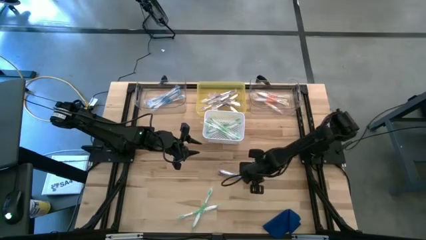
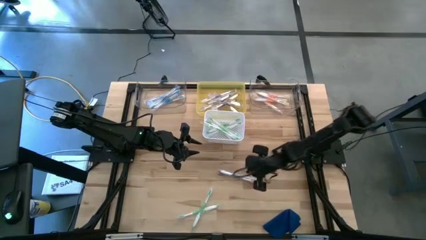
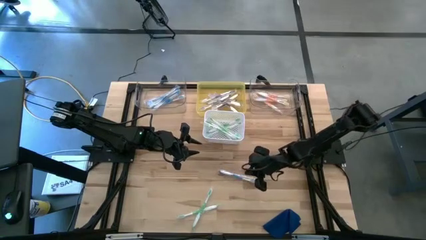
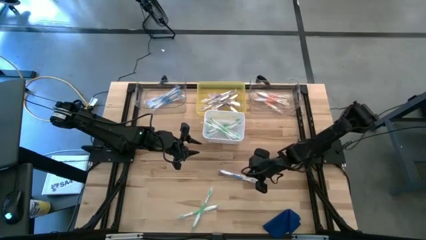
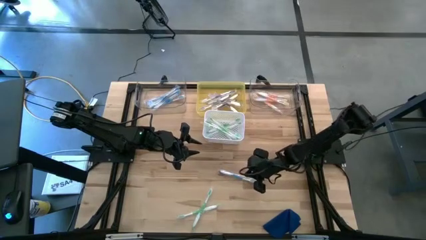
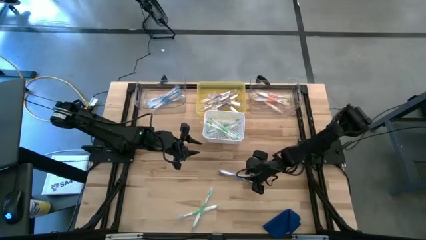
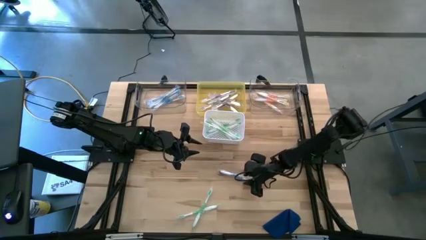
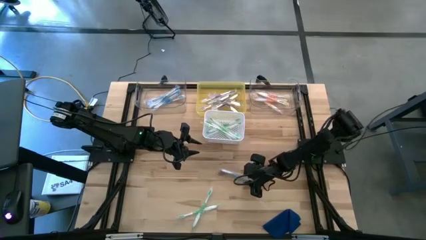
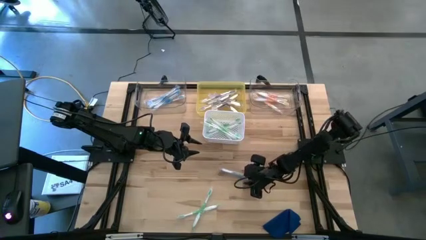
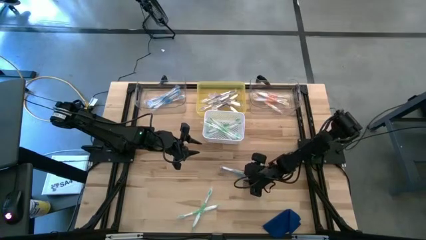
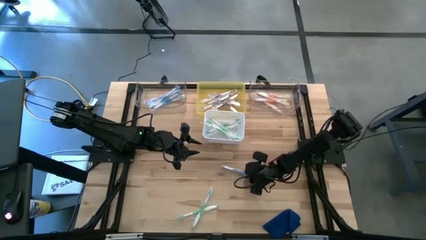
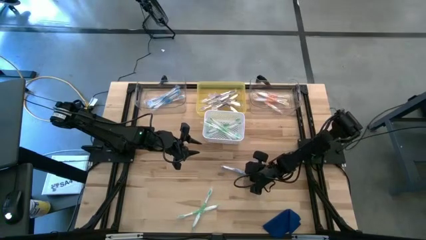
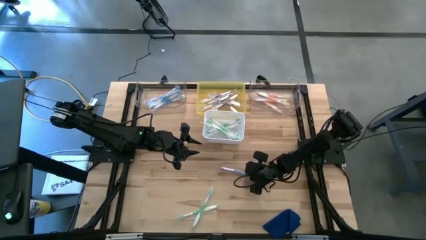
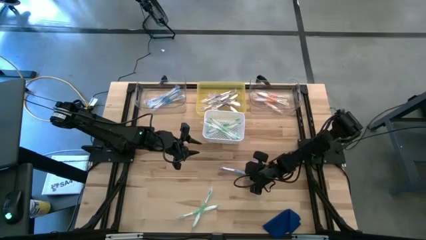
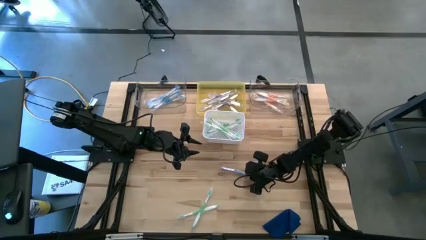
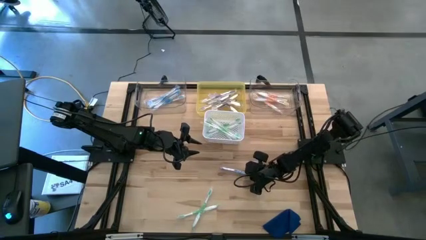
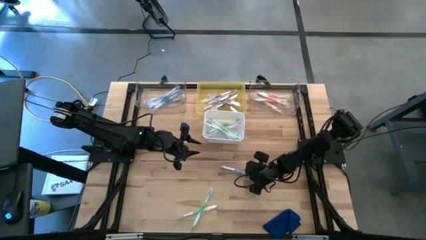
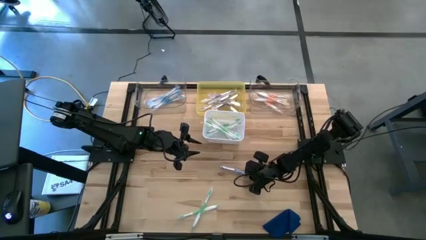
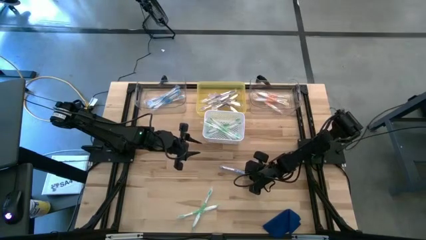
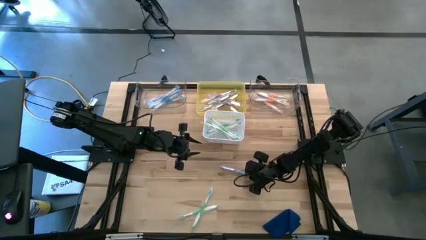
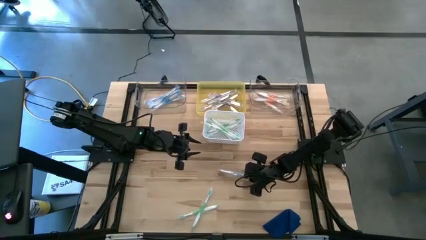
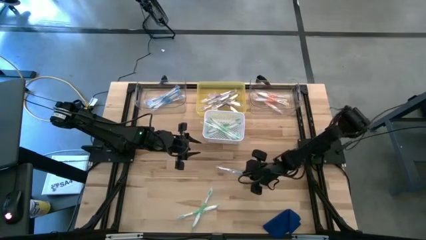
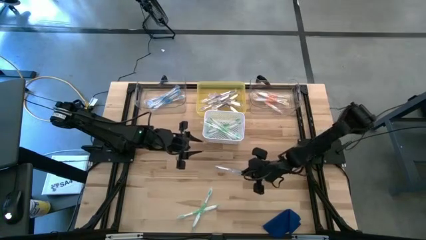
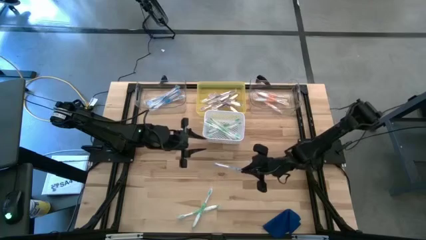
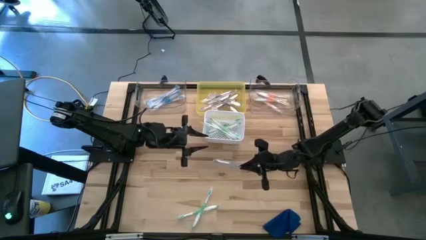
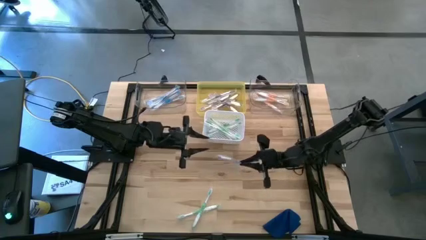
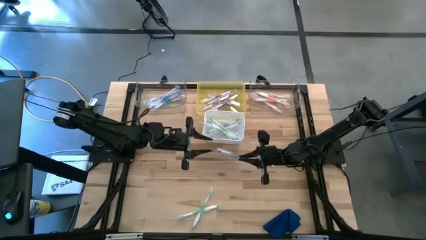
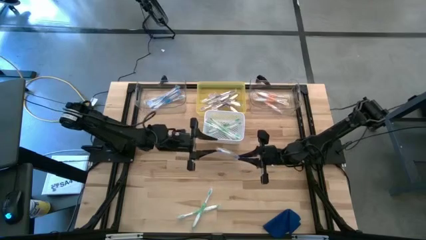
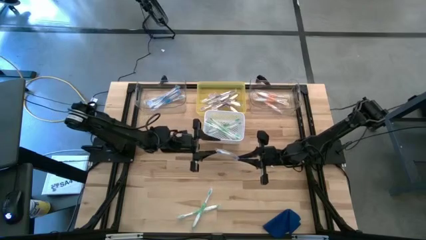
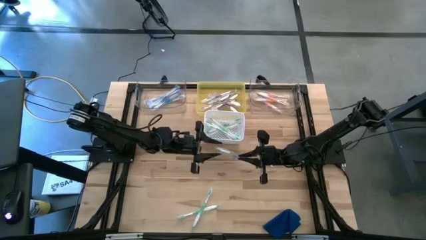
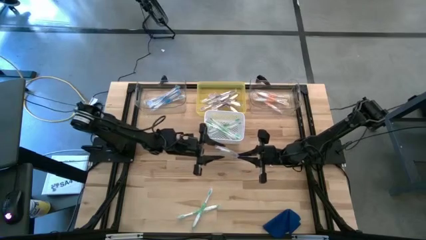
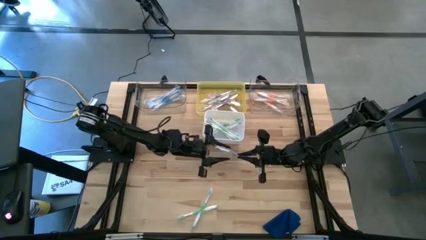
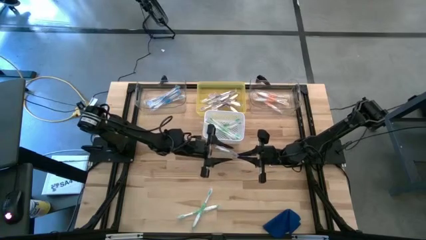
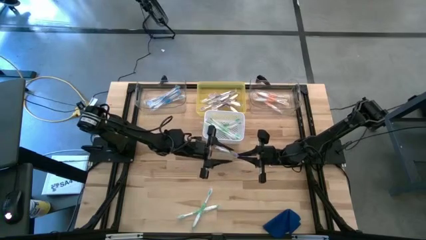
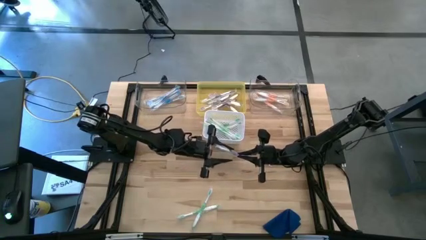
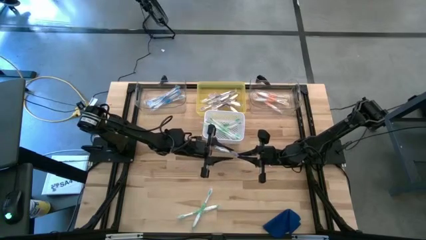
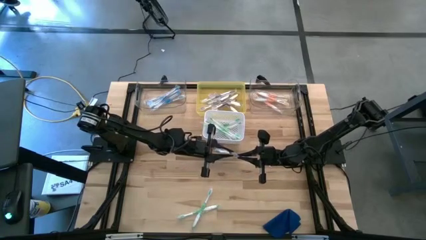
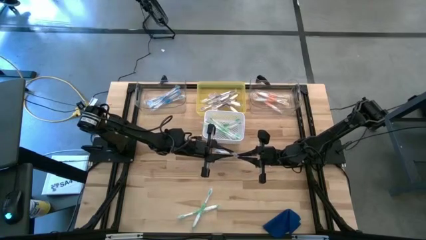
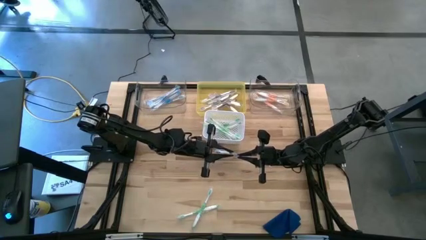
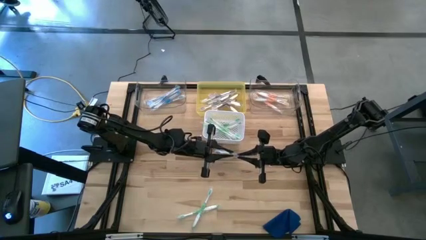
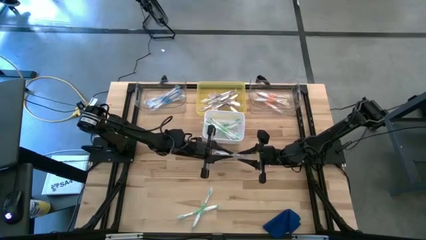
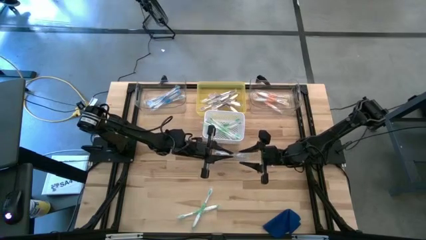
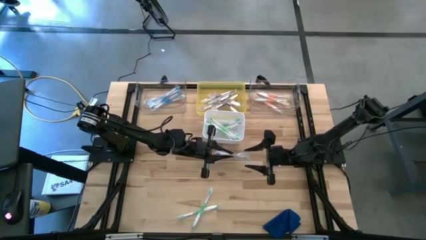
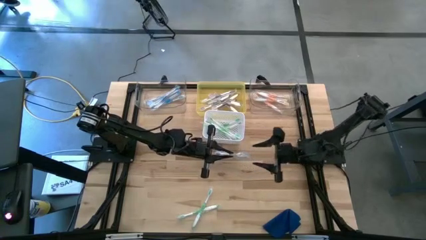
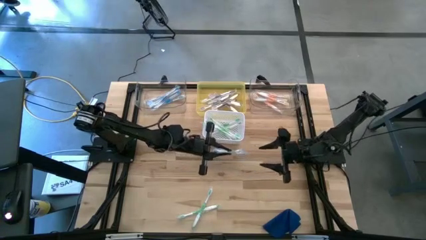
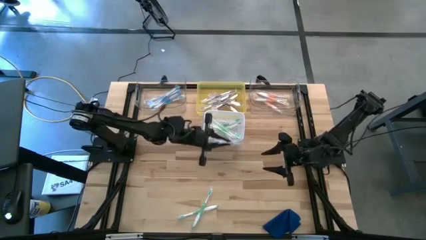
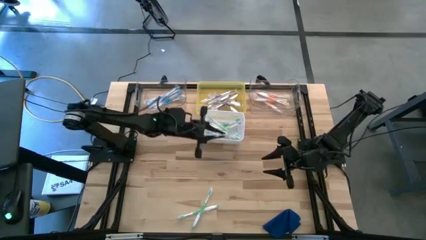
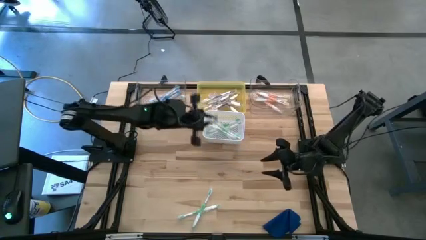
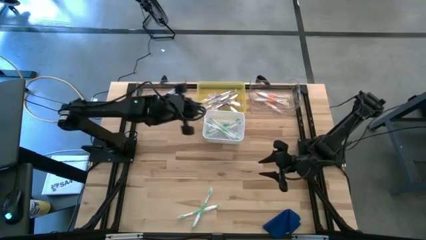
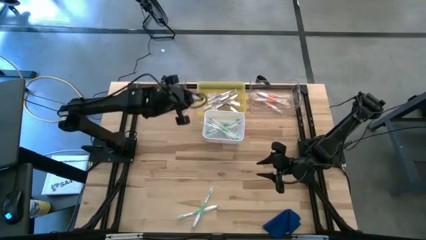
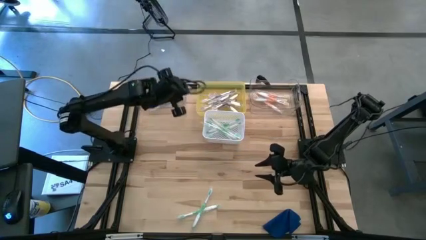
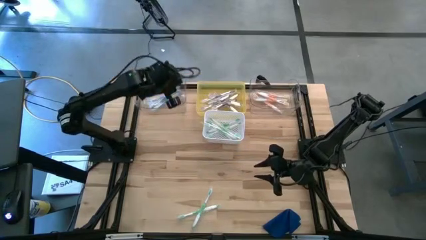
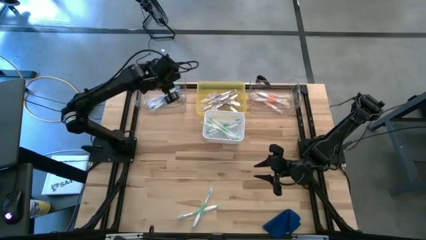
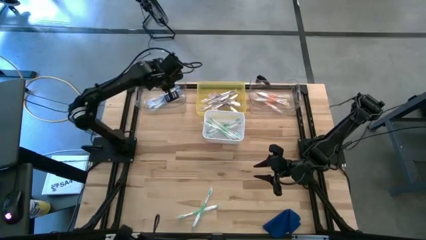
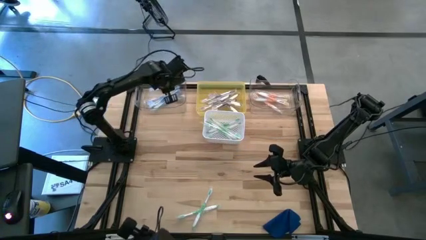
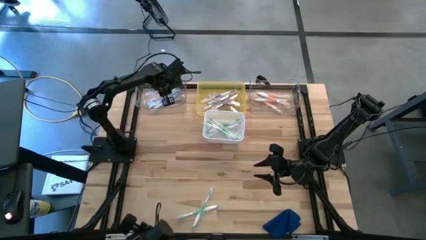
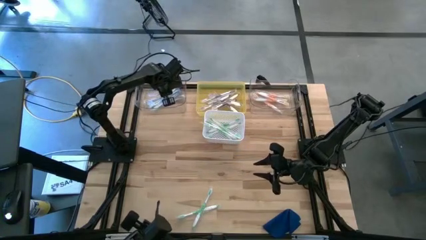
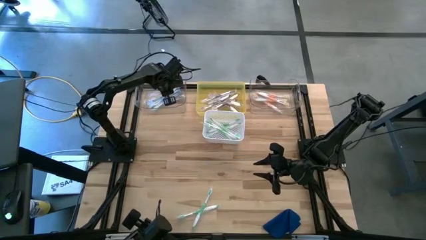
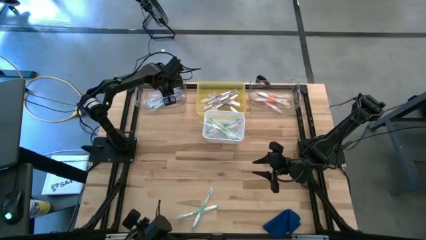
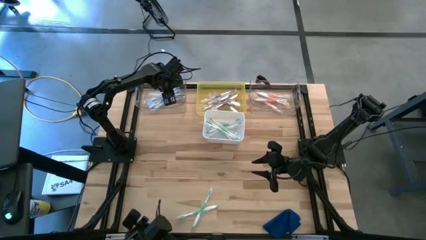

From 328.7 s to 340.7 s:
Task: Pick & Place Toothbrushes
Put the blue toothbrush into the left transparent bin
